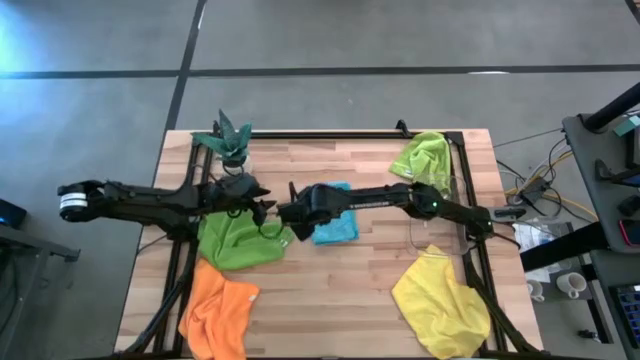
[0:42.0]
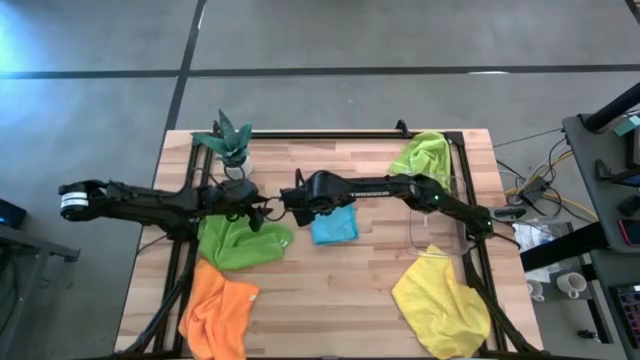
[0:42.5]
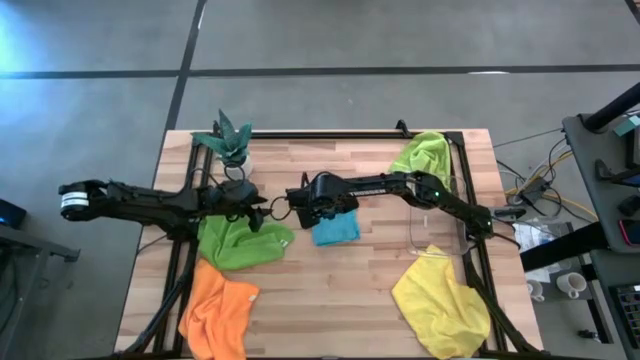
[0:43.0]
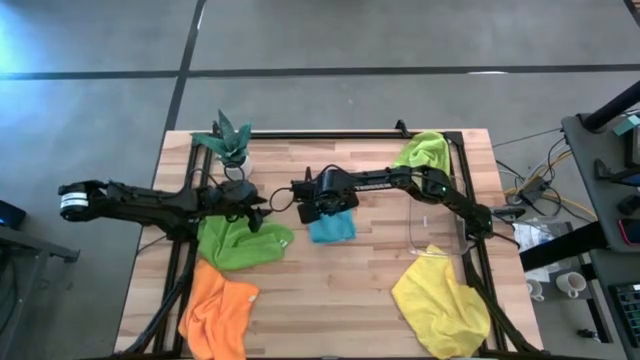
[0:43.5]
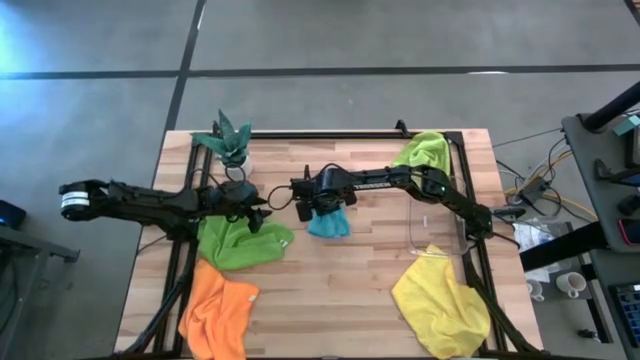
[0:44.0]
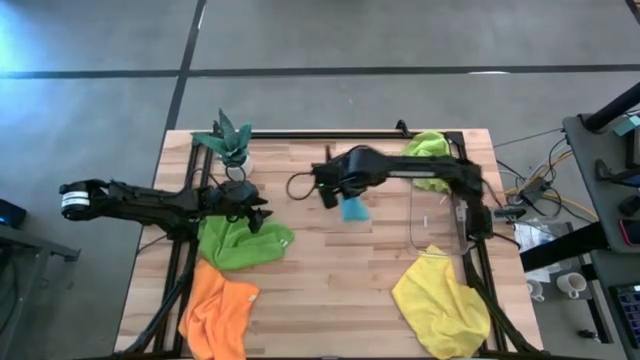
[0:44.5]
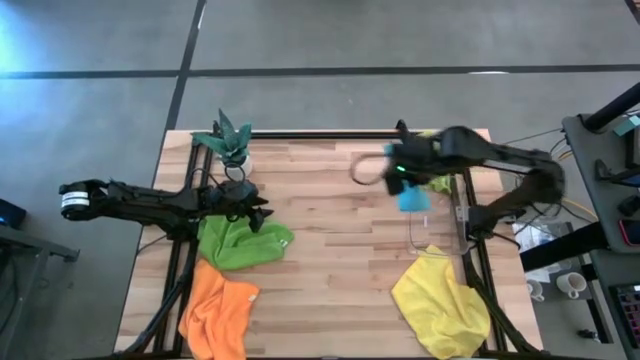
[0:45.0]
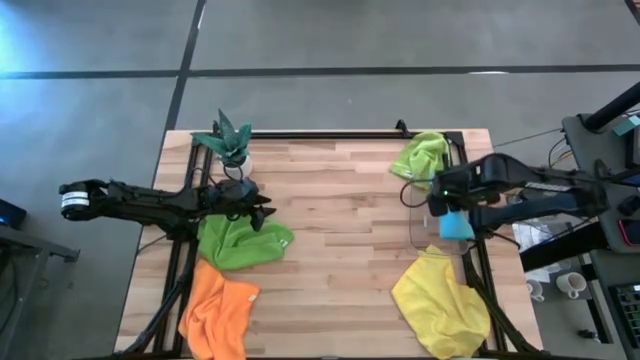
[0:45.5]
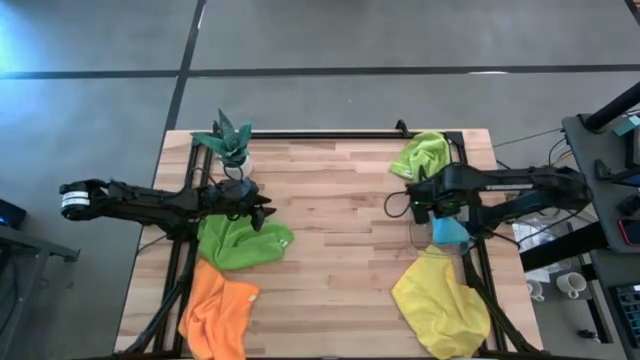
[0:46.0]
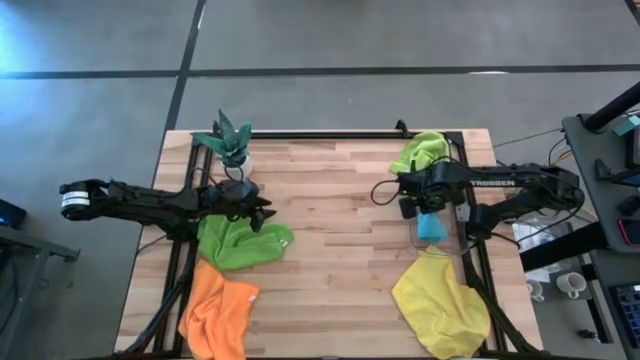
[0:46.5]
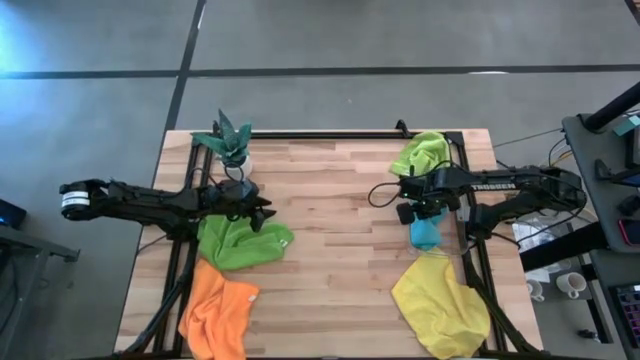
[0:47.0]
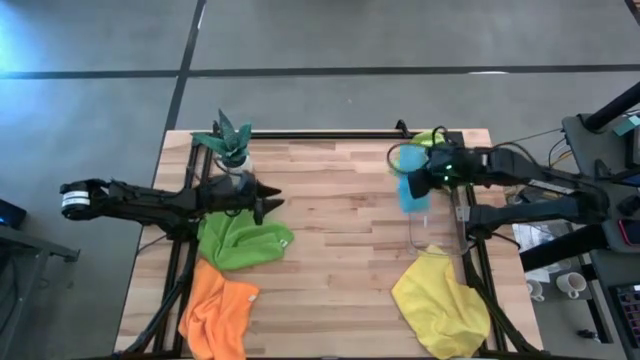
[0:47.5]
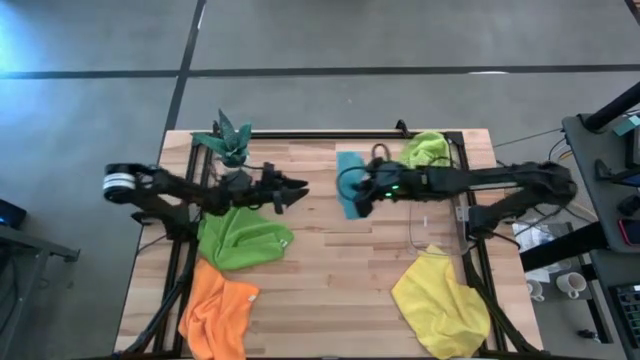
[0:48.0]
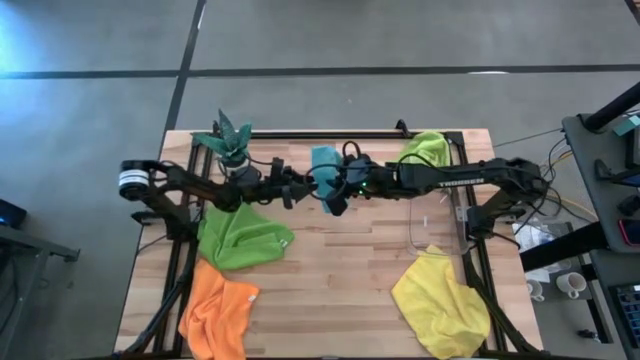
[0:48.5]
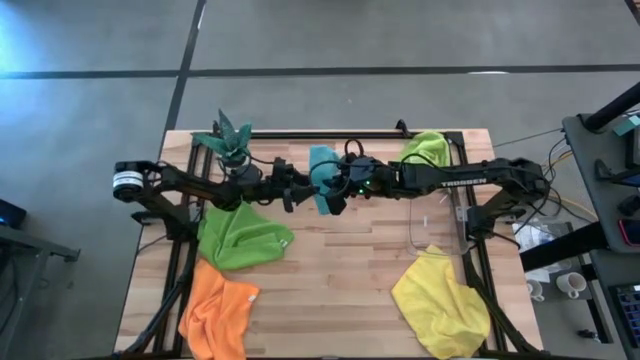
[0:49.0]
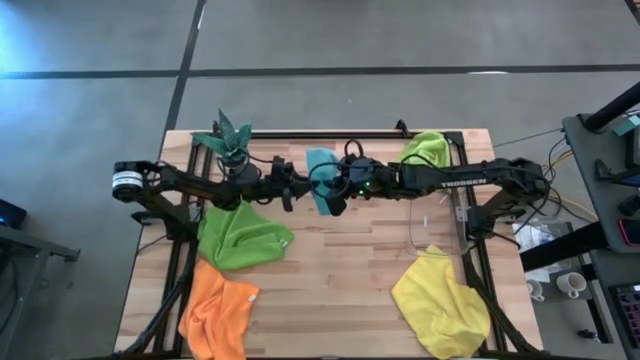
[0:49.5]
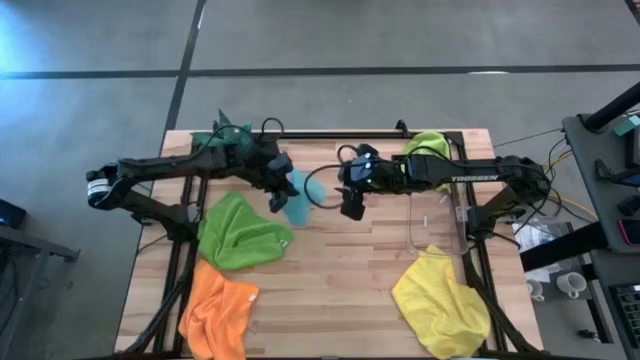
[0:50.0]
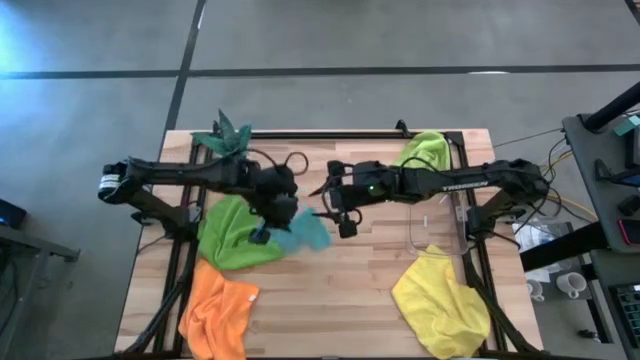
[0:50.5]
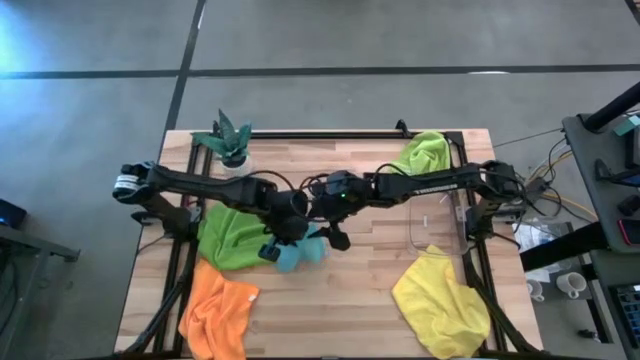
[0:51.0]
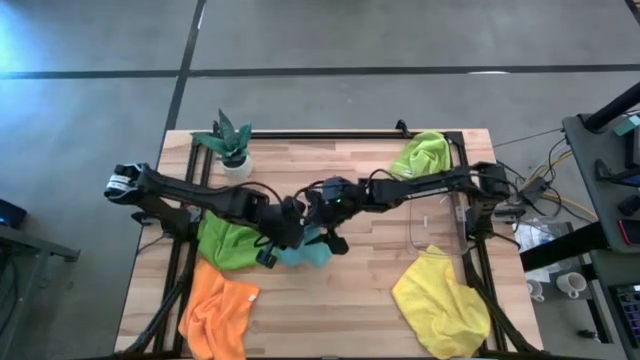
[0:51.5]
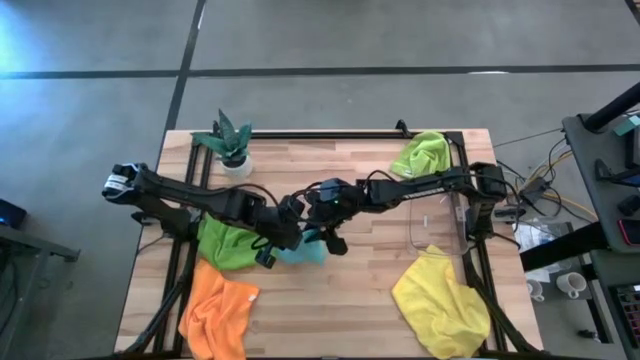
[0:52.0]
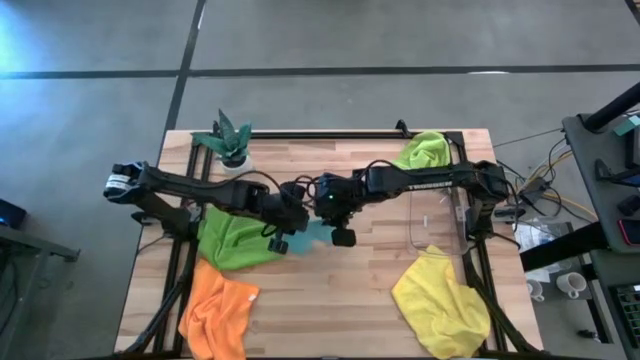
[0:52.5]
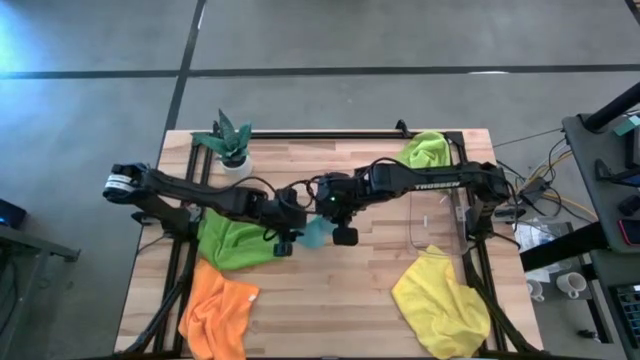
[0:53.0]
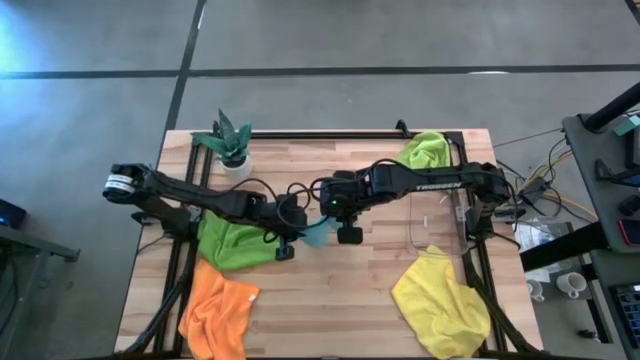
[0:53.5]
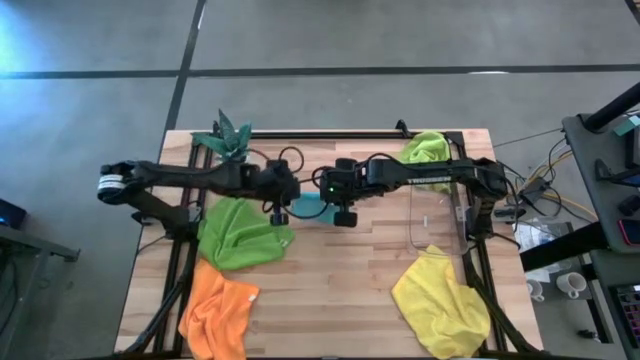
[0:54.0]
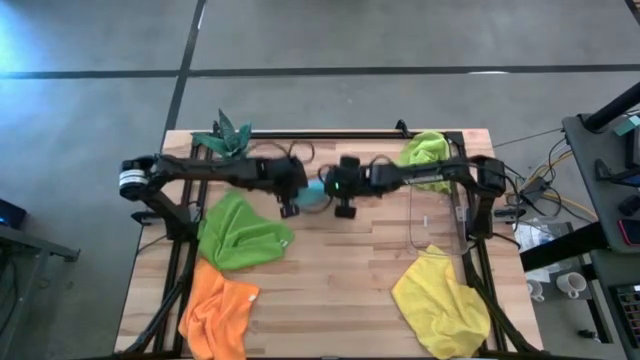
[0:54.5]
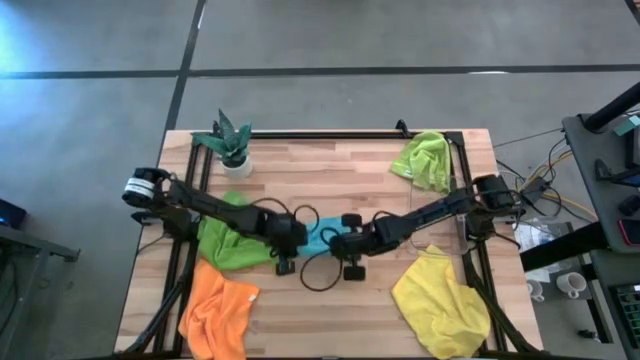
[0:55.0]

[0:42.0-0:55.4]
Task: Fold microfiber towels
Put the blue microfiber cloth into the transparent bin
